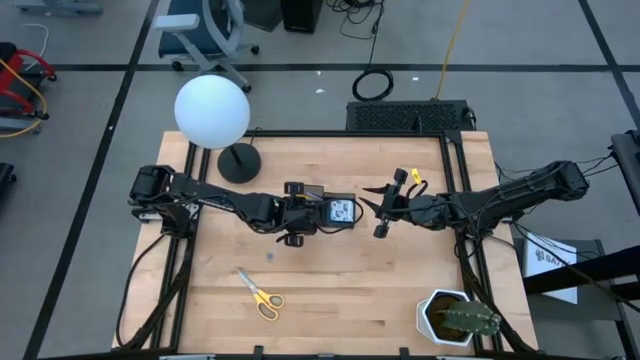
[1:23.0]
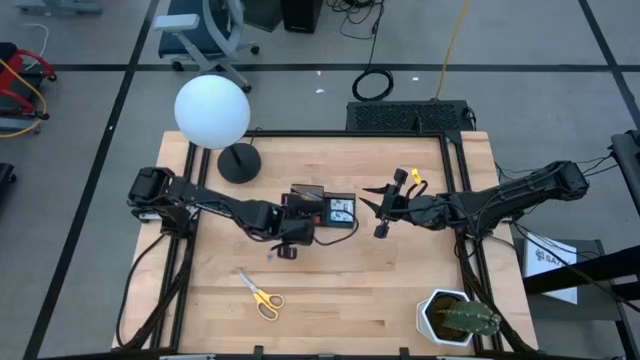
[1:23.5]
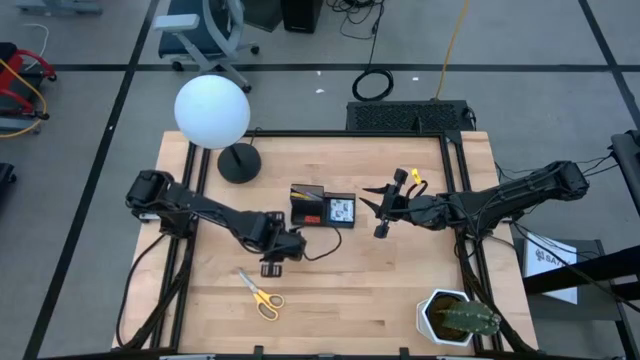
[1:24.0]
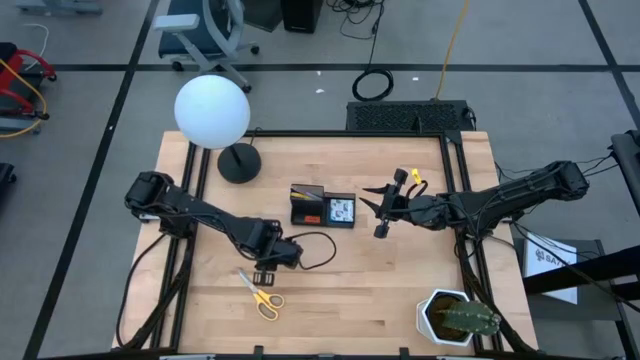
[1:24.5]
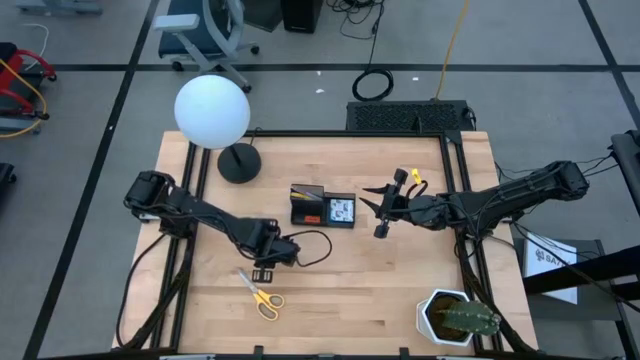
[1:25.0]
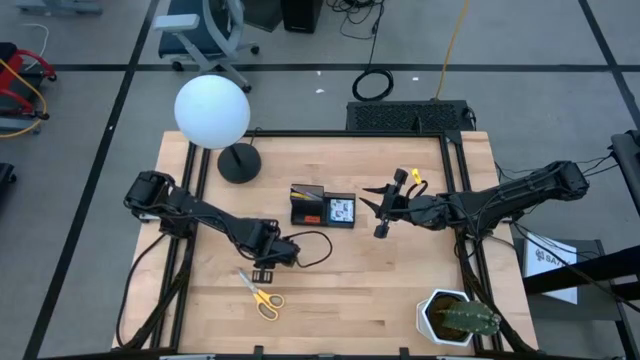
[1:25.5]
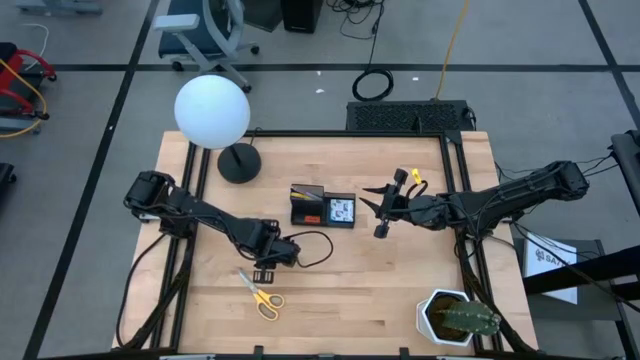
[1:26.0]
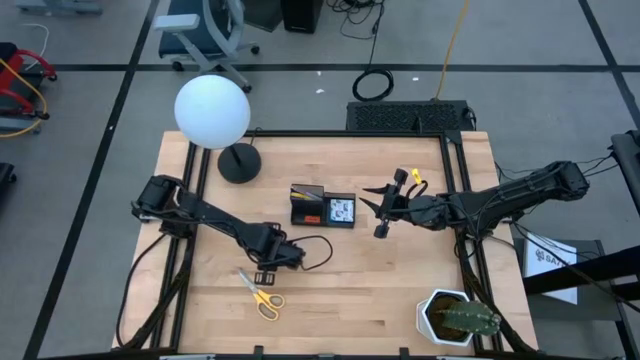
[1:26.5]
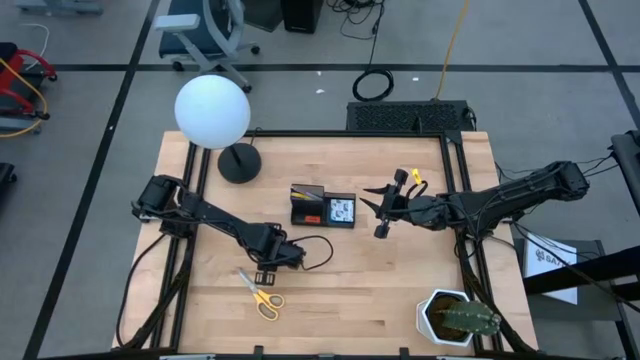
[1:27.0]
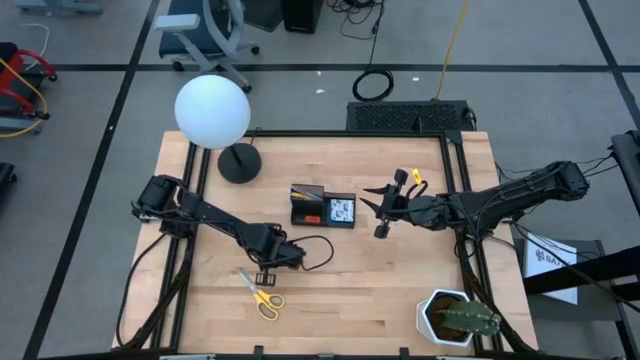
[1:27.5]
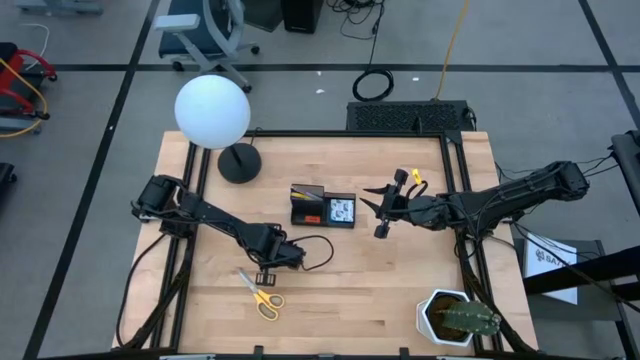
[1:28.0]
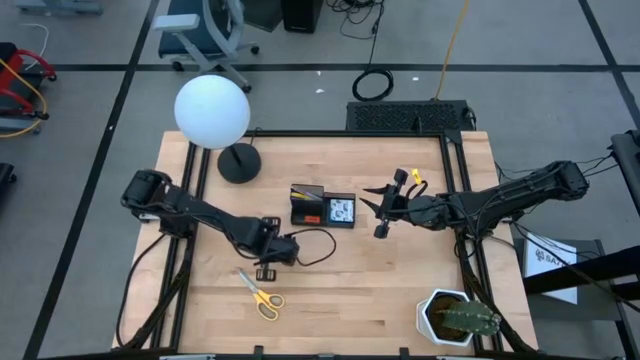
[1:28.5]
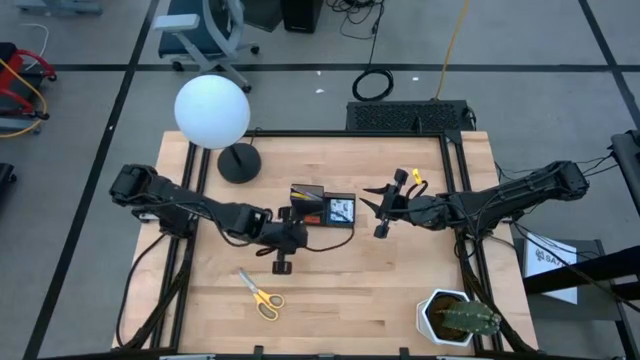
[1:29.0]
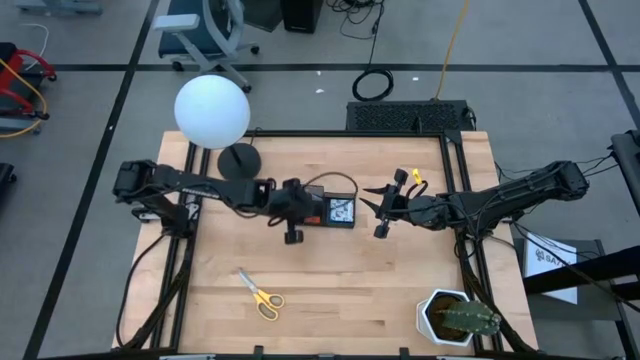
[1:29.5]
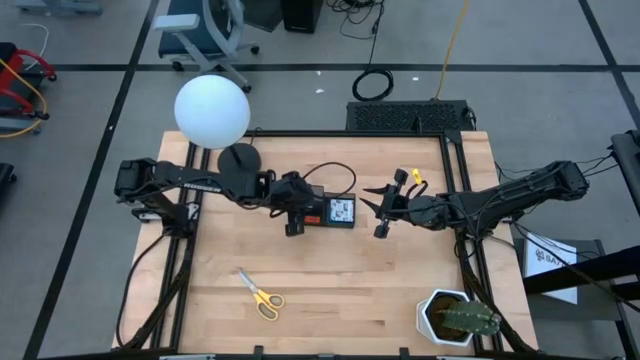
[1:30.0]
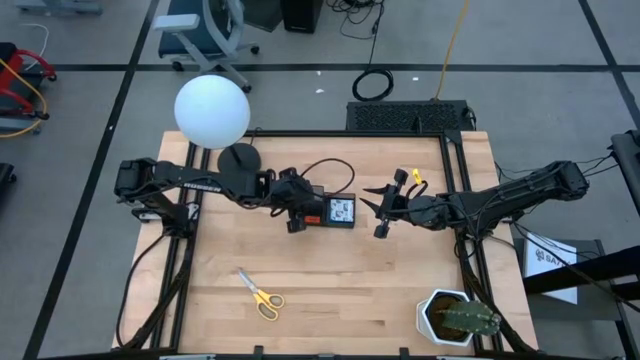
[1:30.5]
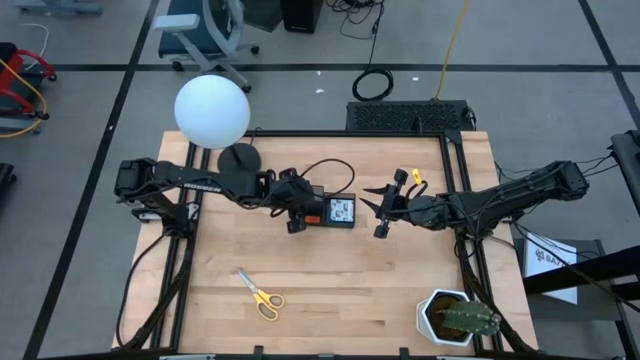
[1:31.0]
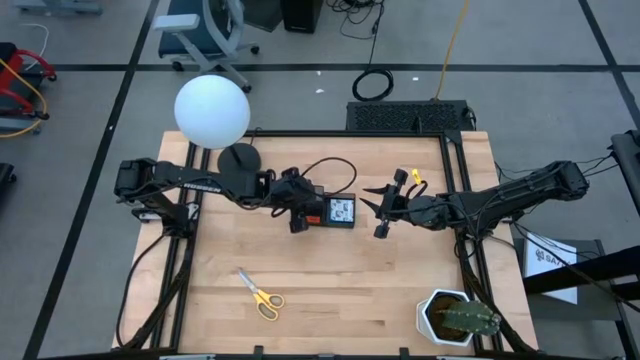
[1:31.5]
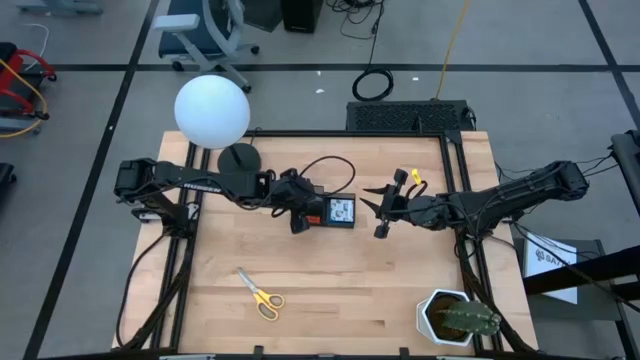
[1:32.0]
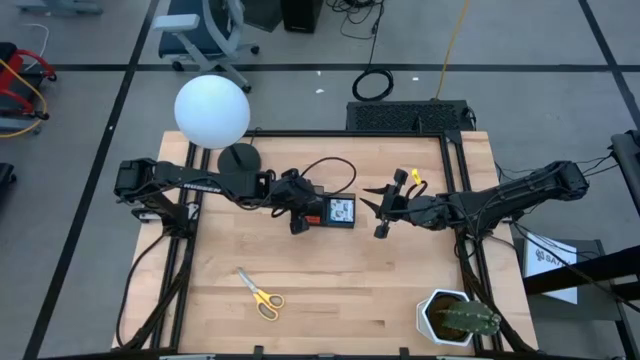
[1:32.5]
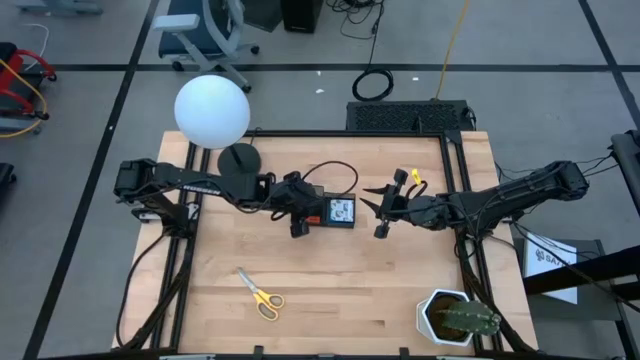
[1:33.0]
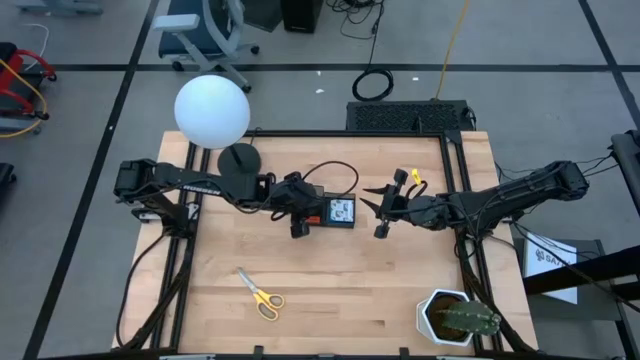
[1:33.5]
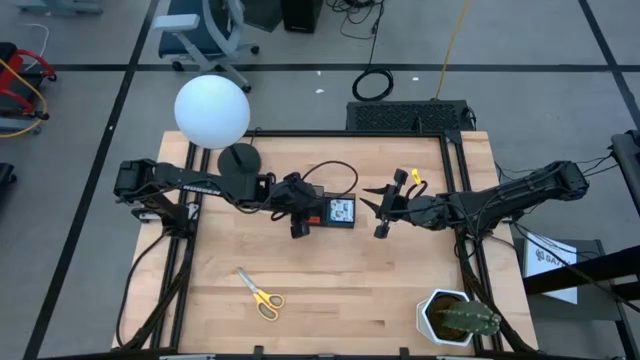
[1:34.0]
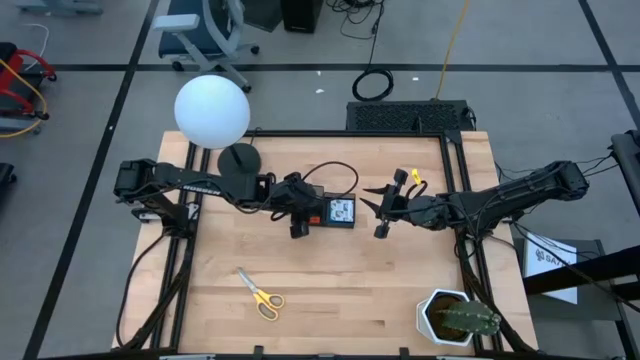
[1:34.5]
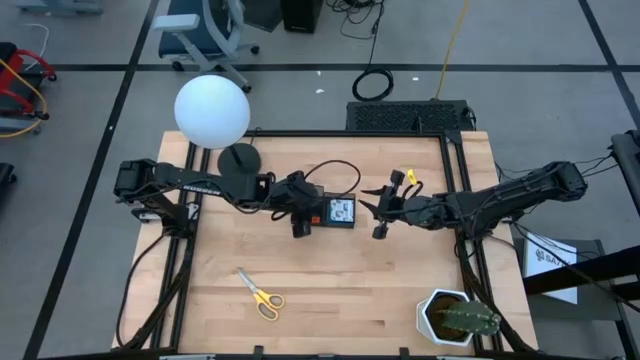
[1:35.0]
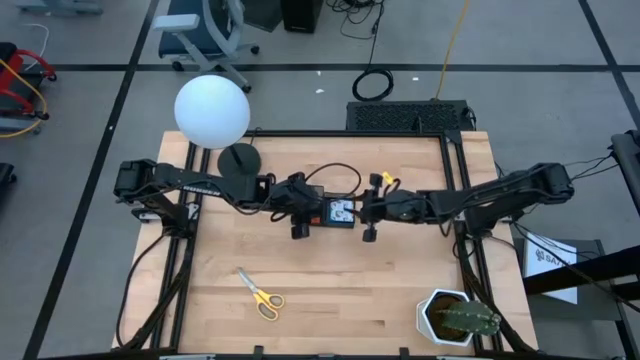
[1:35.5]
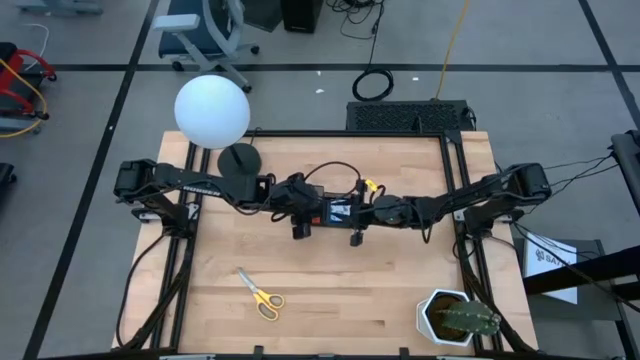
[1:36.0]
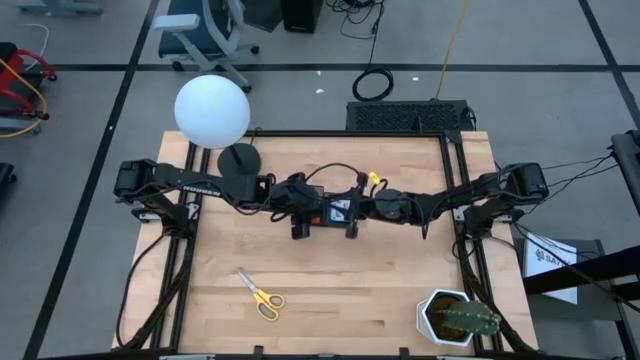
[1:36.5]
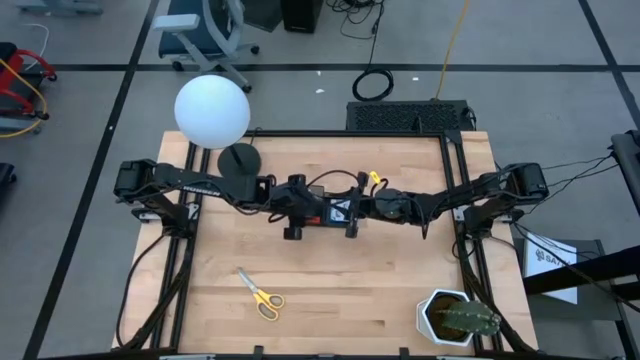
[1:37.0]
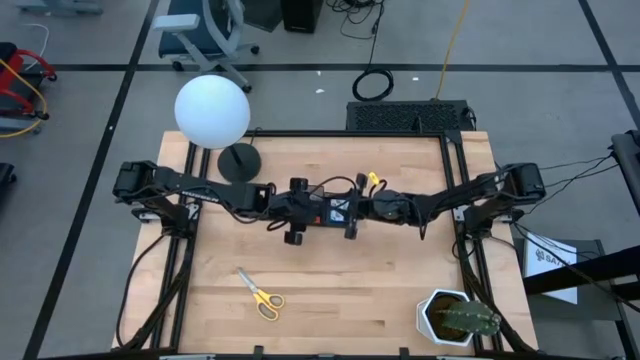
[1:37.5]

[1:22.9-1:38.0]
Task: Pick and place office supplies into organizer
Put the blue binder clip into the desk organizer

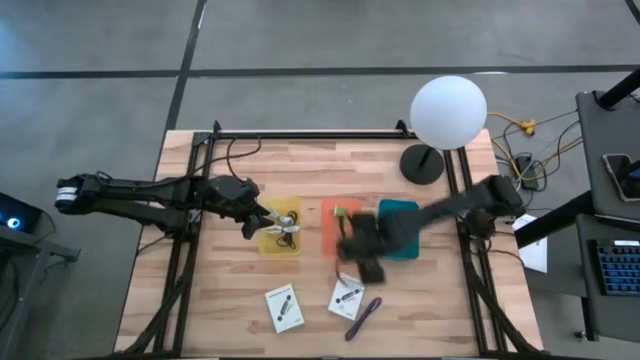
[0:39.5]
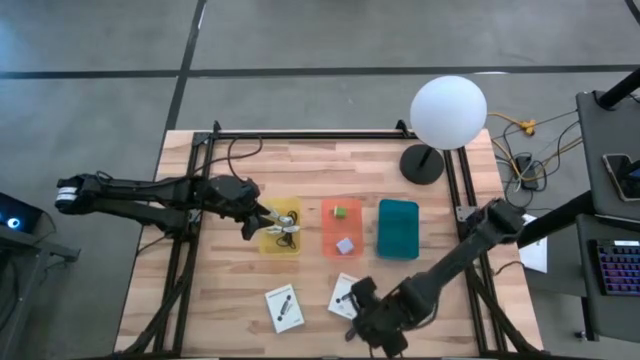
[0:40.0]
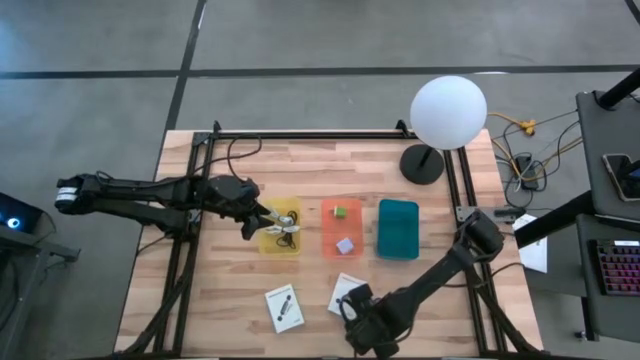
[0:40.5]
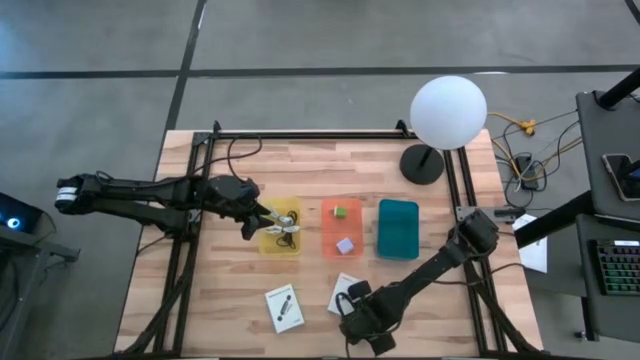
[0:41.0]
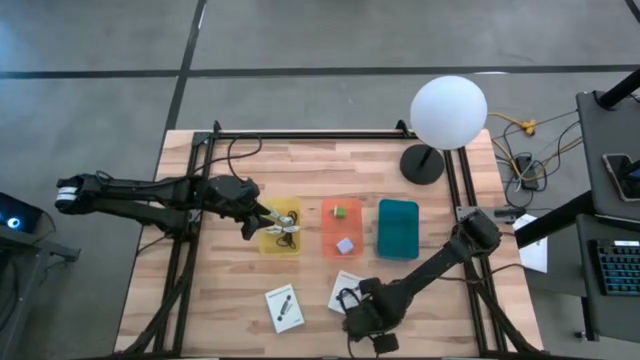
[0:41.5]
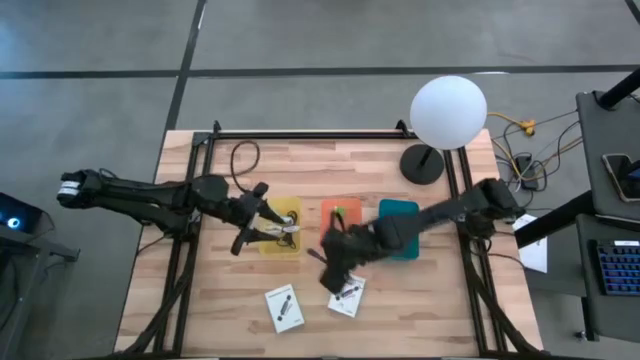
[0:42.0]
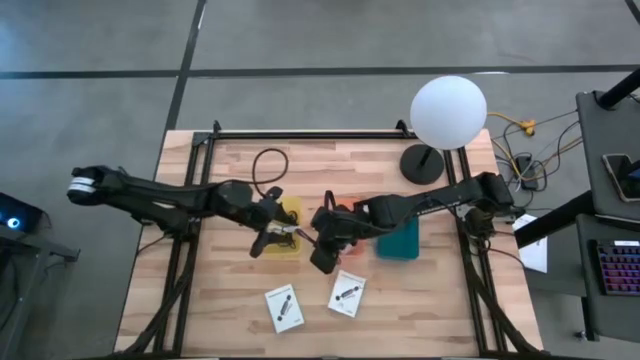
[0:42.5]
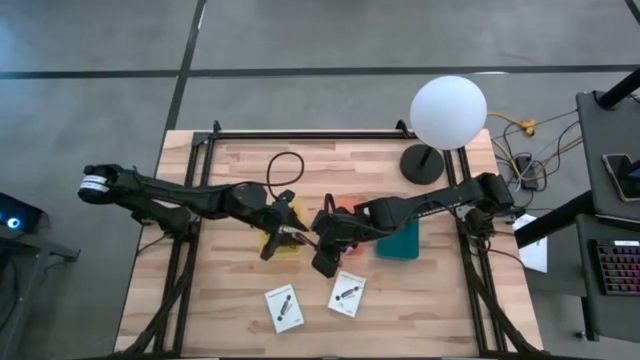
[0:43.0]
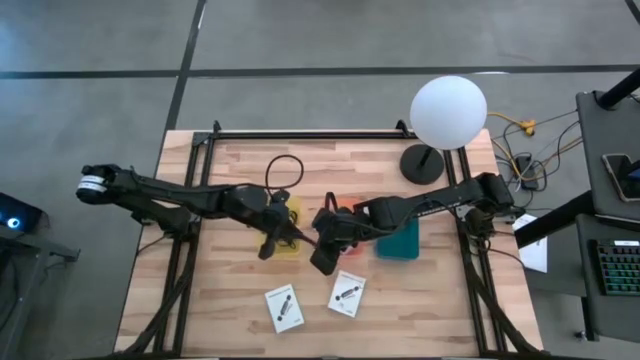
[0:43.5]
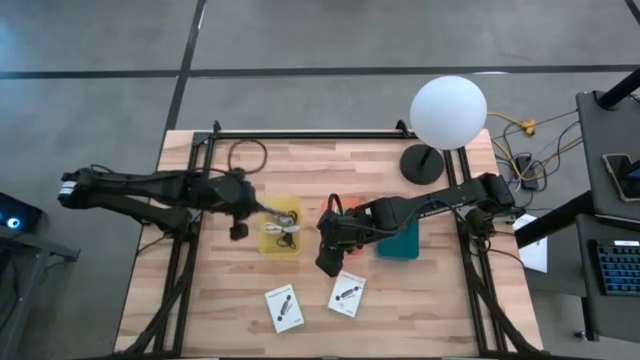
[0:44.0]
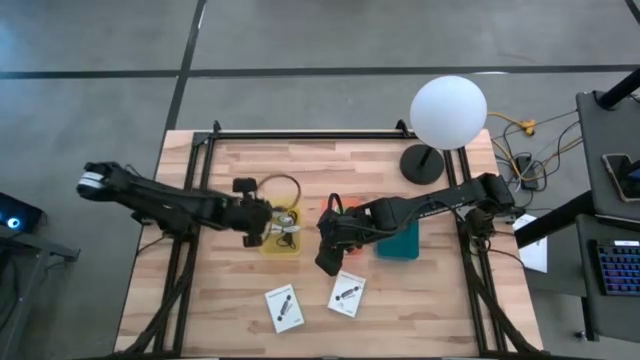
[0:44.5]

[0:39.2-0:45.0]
Task: Pick and place items into bin
Put the violet USB cable into the yellow bin
